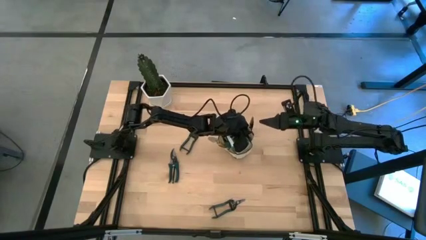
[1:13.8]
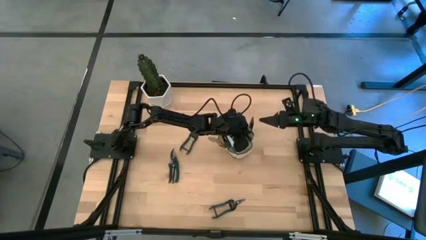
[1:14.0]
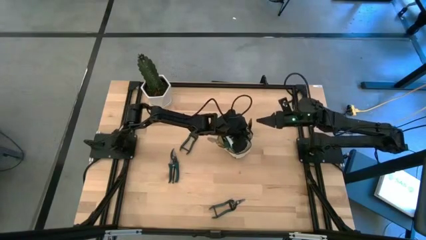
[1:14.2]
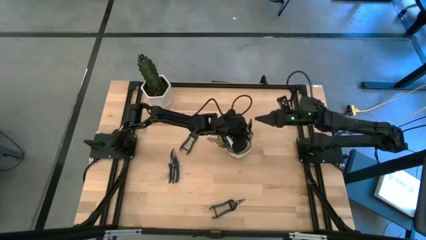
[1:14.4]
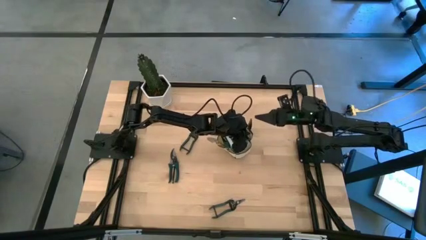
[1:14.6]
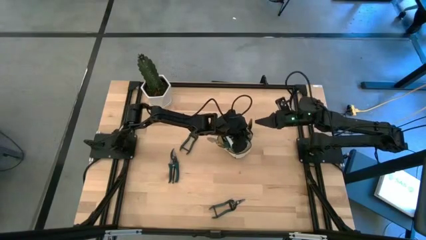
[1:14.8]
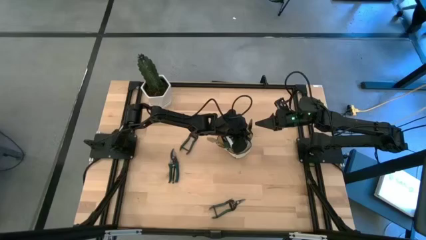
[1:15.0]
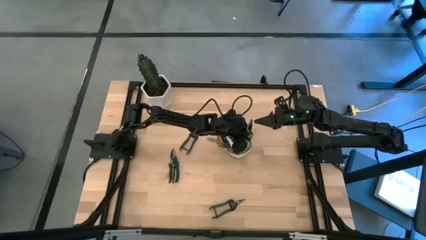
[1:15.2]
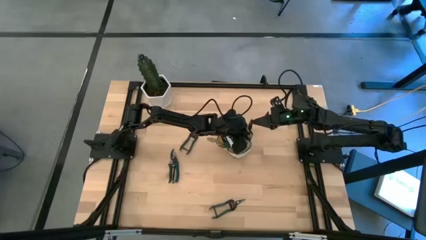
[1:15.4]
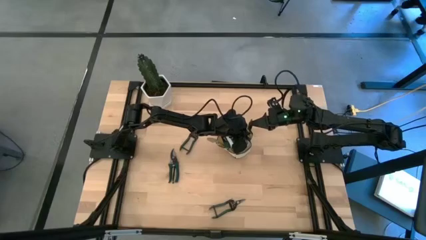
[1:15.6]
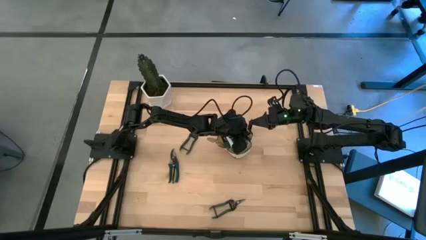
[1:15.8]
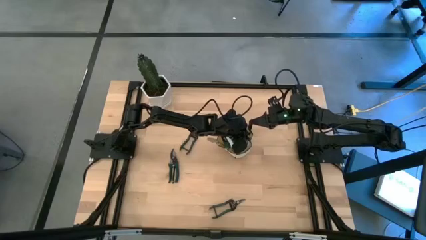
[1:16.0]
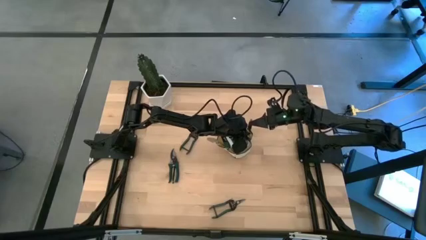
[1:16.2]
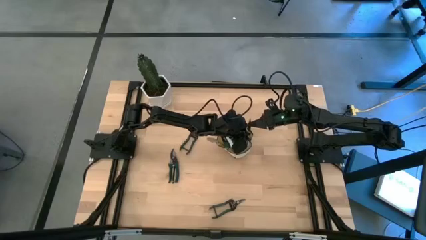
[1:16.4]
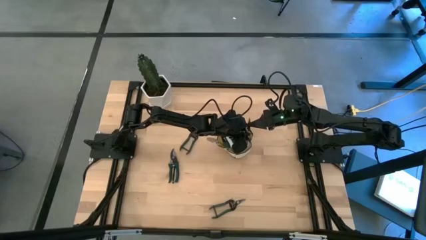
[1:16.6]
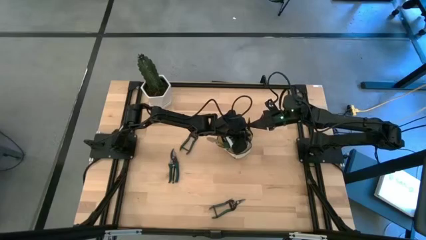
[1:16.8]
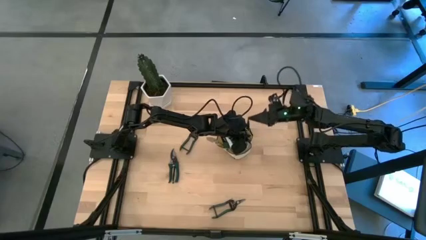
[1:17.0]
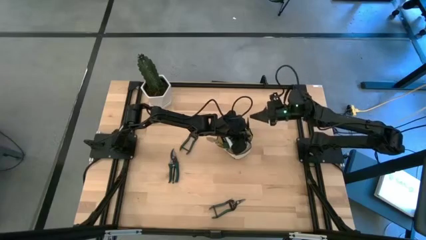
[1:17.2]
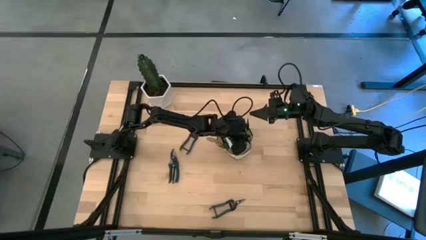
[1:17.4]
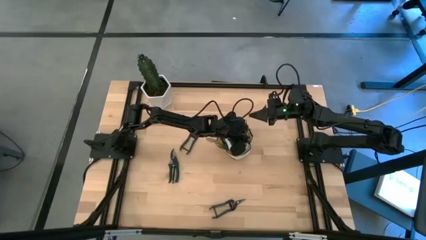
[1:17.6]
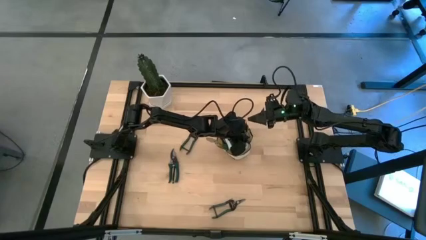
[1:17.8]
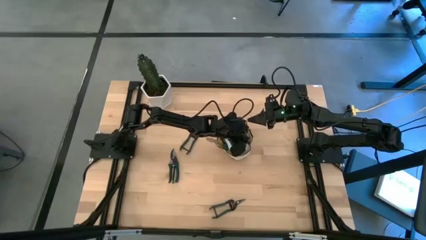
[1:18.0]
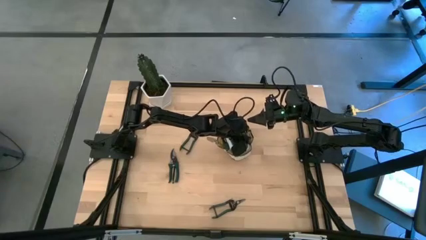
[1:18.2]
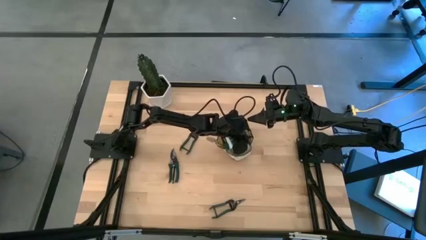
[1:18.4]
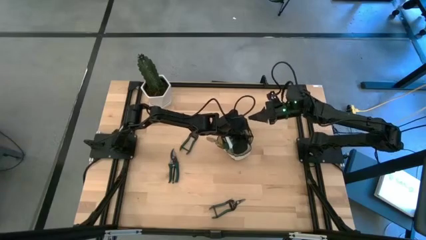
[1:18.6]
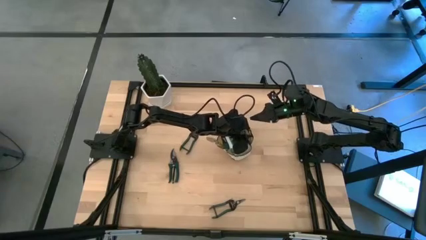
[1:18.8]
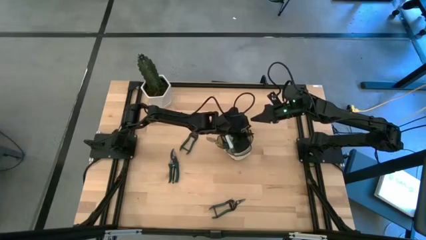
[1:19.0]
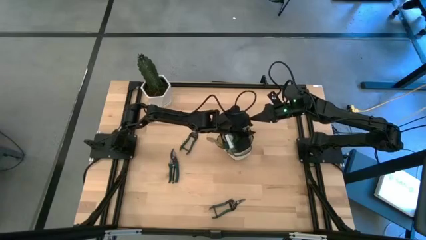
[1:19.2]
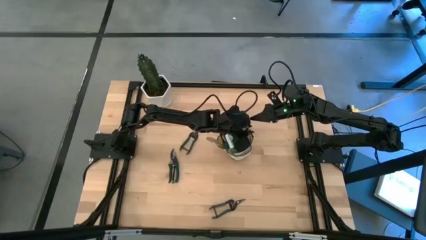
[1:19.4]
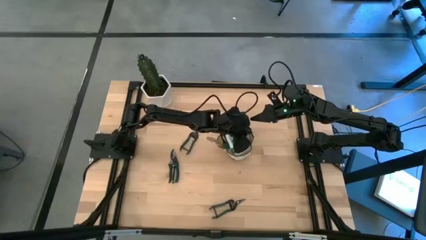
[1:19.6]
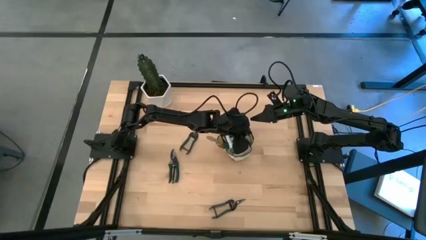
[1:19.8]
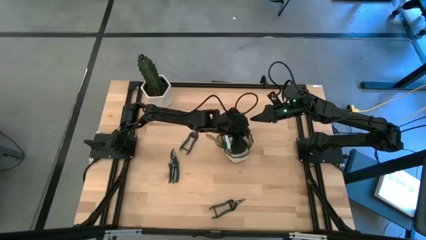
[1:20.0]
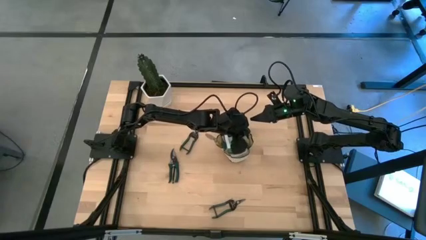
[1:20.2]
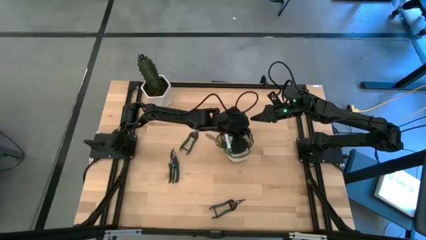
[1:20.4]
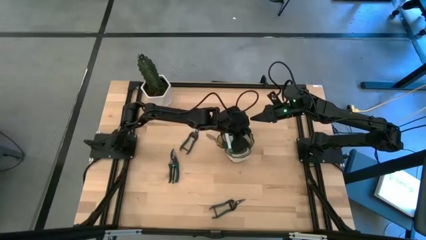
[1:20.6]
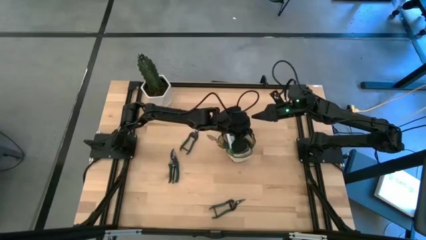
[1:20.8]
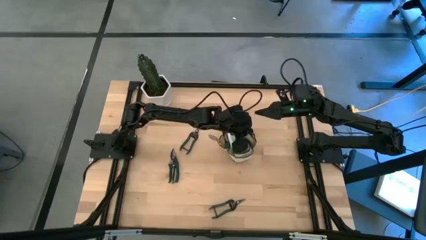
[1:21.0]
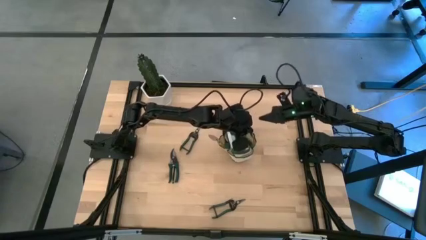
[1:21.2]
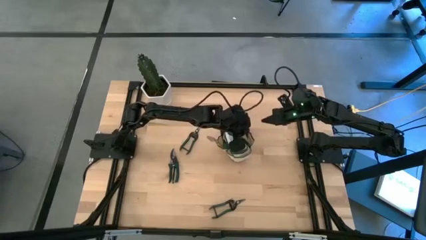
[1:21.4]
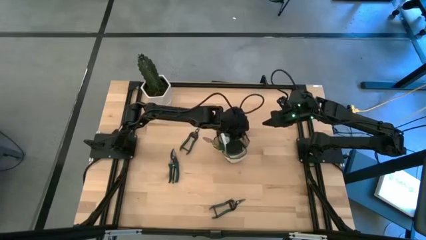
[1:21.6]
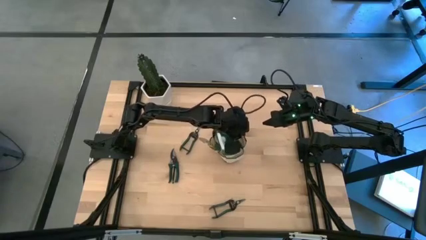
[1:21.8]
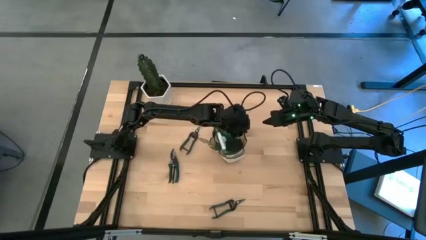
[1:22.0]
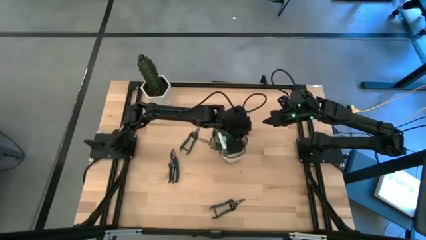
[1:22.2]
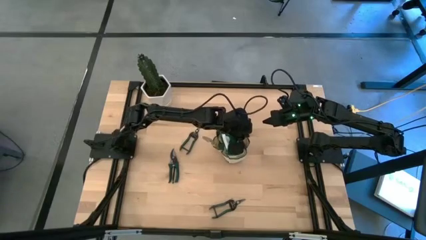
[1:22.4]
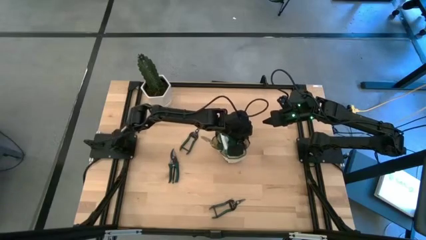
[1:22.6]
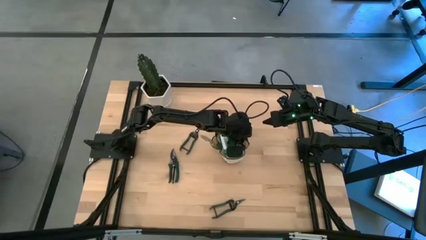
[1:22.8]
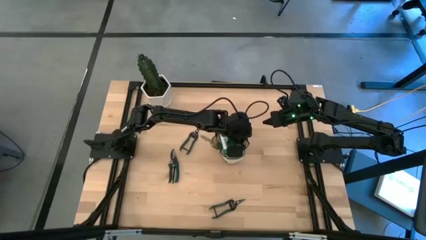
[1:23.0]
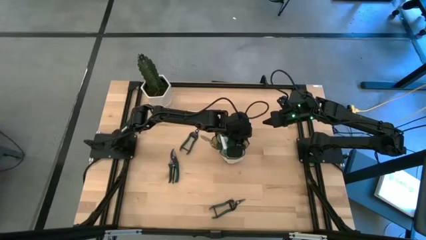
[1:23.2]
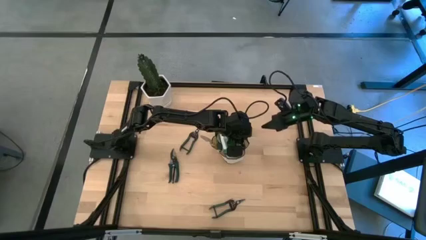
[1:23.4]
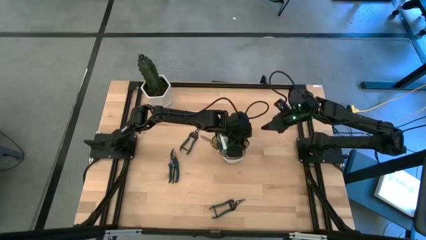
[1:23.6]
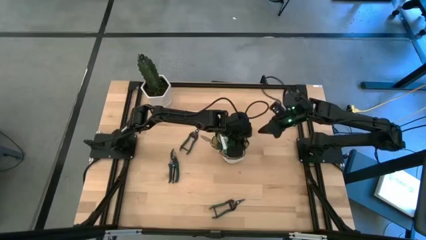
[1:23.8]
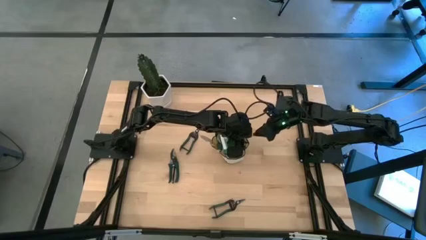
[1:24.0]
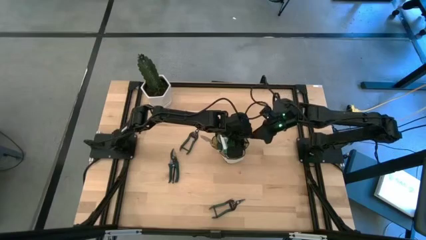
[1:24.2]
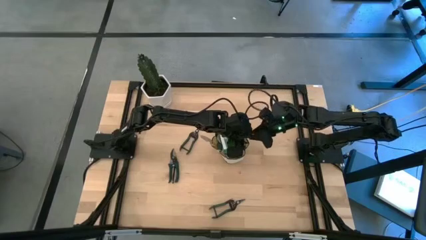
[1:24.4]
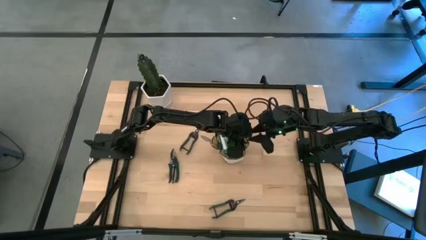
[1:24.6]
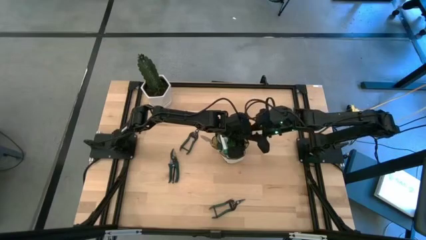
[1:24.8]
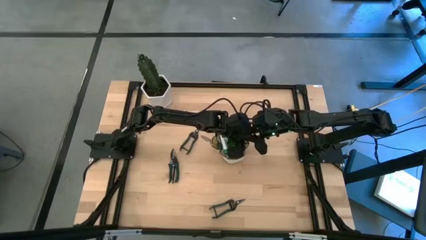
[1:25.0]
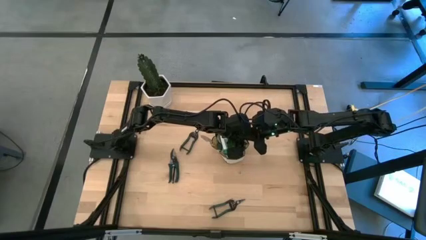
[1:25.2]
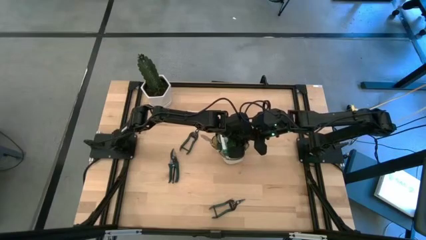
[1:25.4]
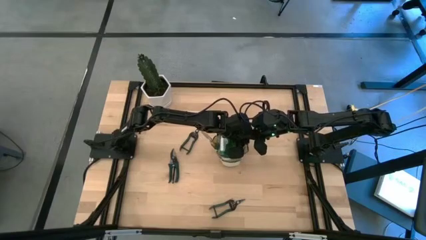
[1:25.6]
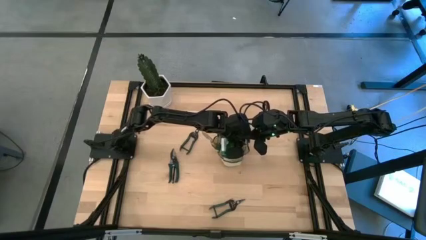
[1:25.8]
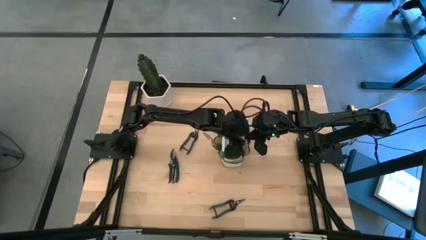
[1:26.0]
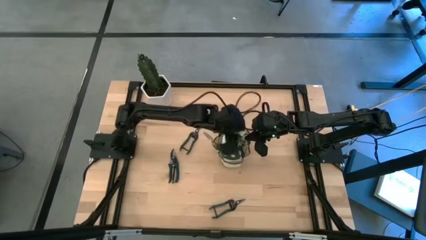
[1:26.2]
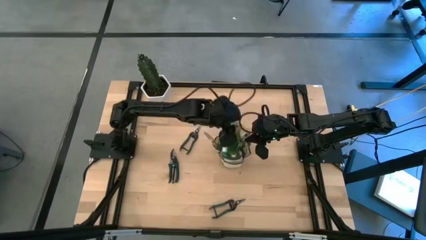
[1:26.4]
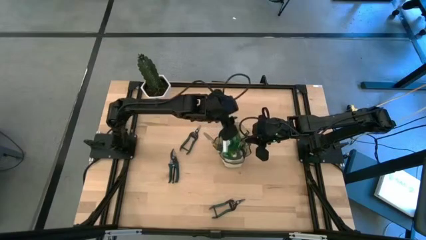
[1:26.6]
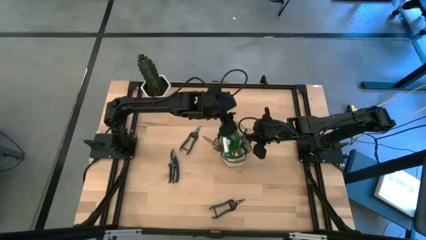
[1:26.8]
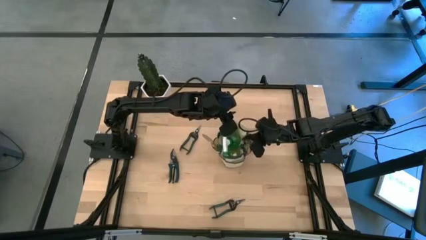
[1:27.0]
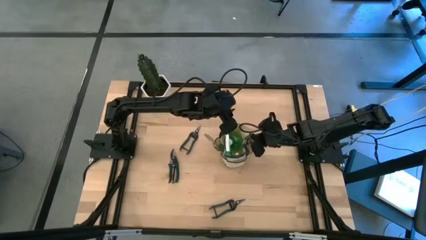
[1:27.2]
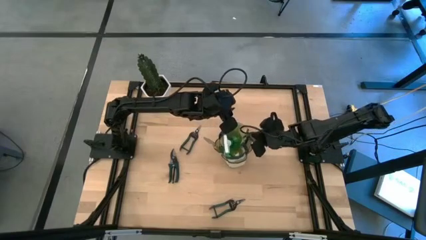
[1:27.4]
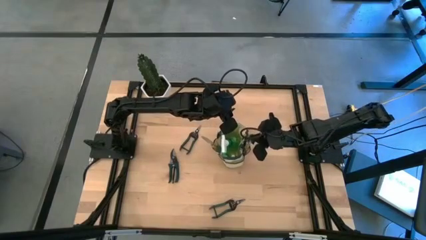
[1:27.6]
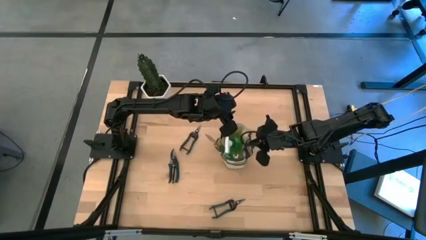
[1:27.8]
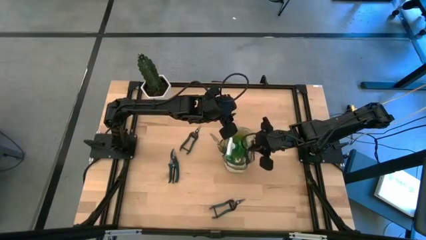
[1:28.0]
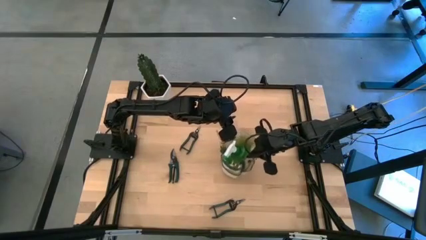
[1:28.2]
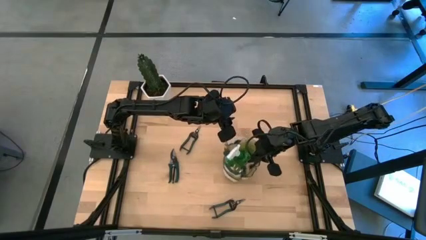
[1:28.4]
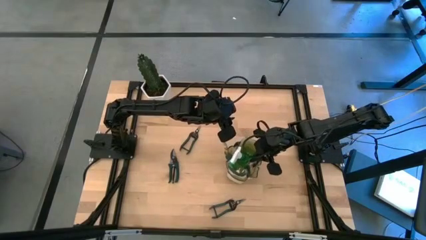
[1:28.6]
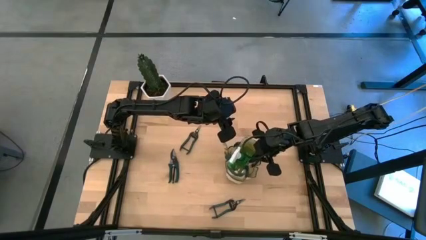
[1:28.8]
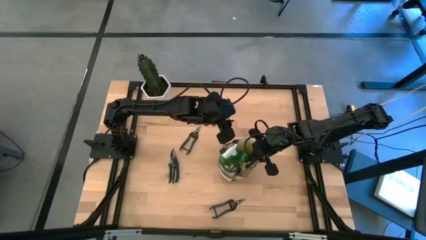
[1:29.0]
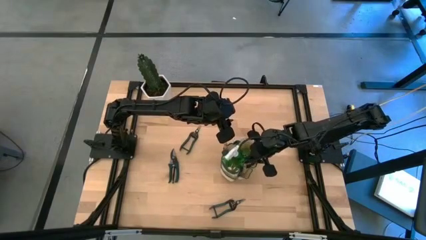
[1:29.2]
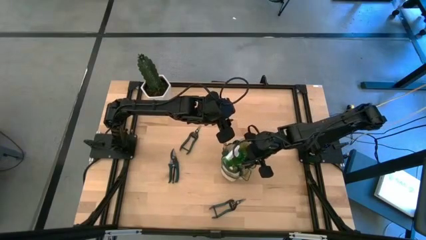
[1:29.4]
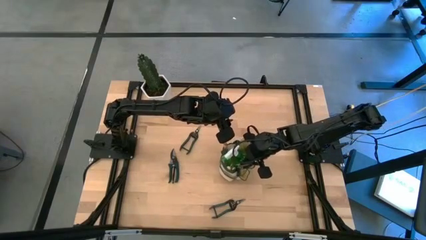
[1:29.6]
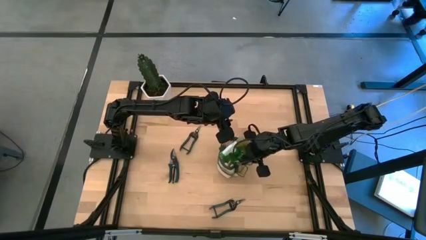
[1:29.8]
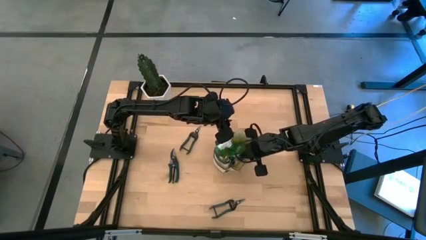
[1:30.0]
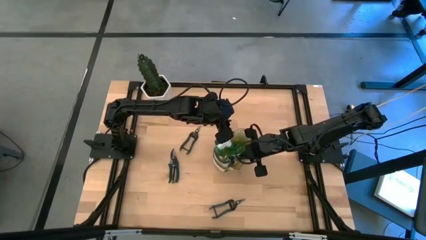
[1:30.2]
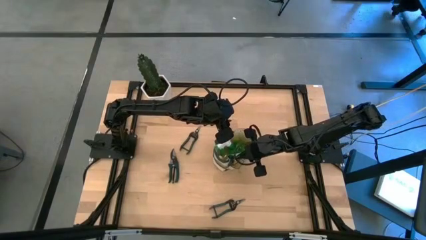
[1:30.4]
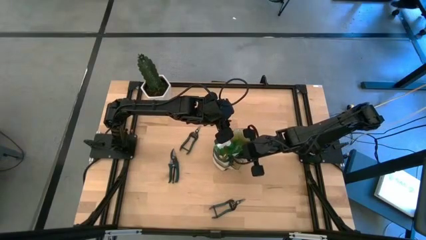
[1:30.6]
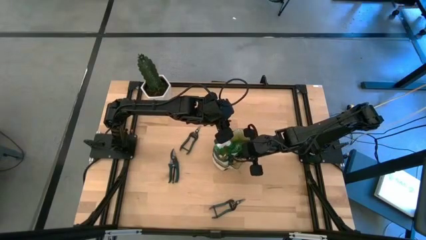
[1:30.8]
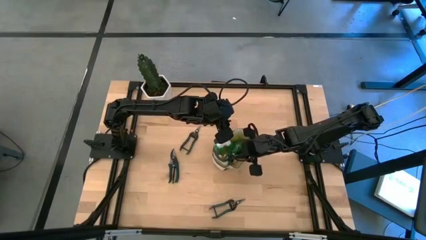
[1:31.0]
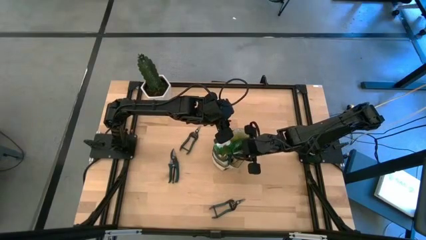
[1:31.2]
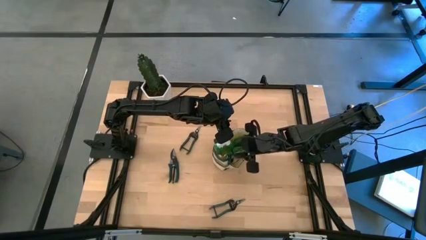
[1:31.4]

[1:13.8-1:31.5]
Task: Pick & Place Garden tools in Gardening bag
Put the trowel into the gardening bag
